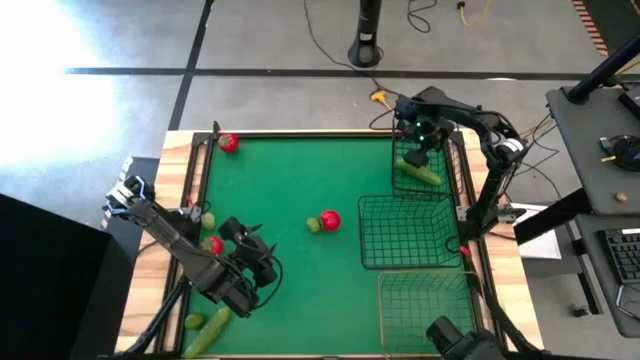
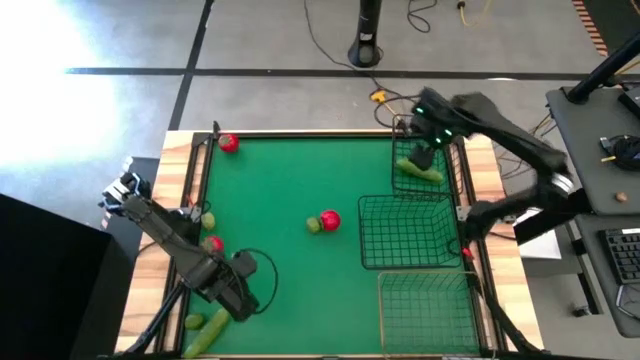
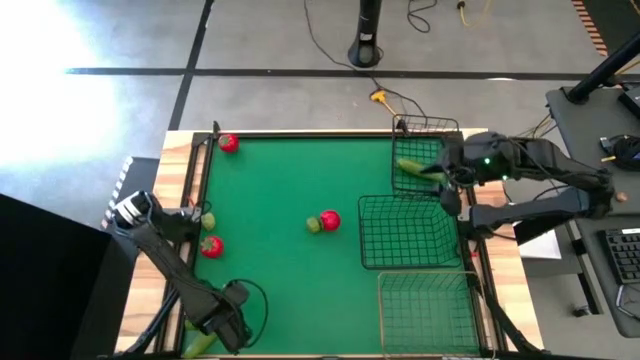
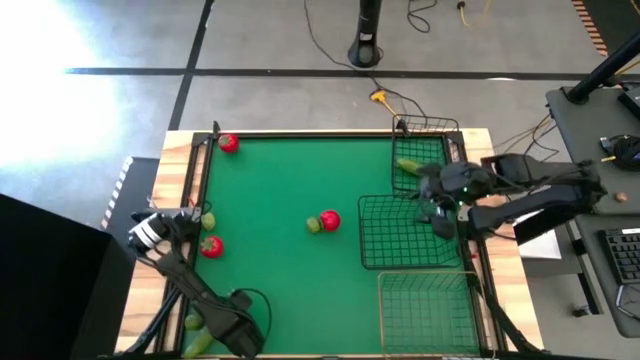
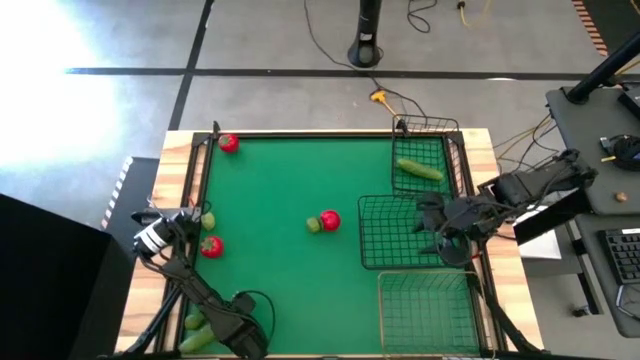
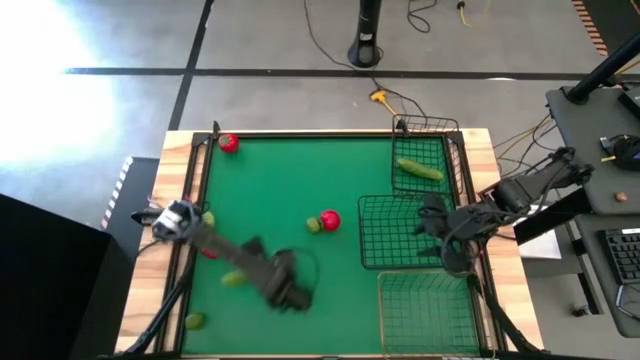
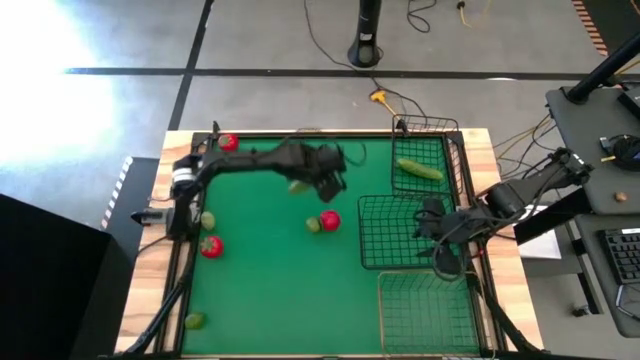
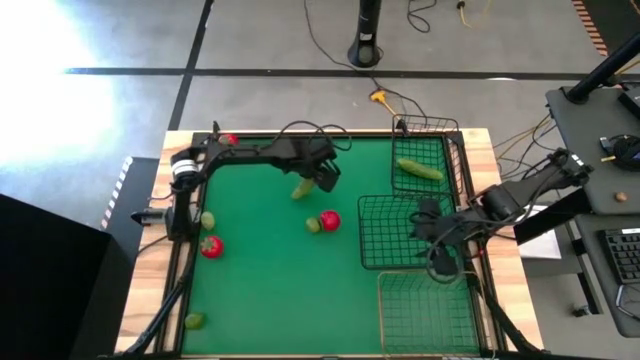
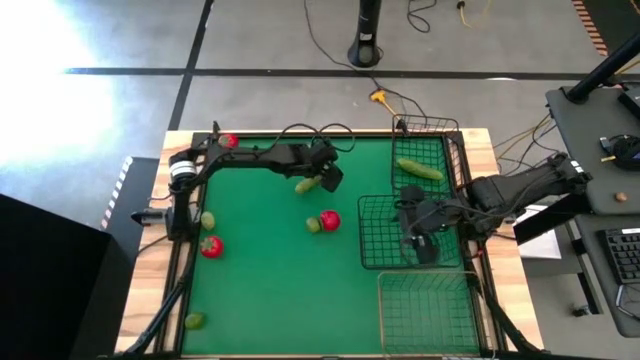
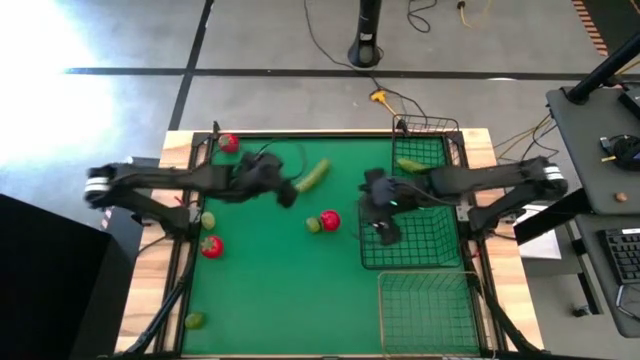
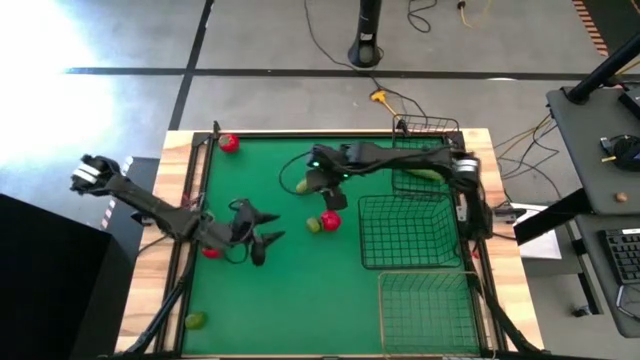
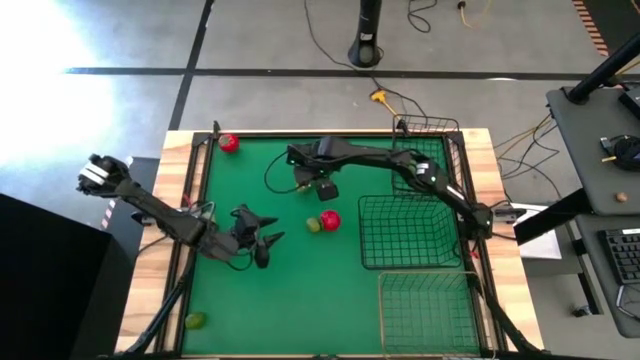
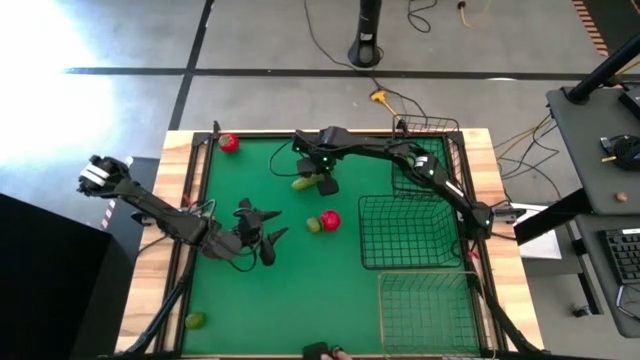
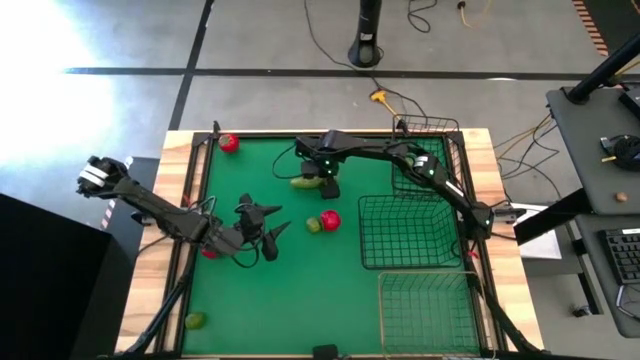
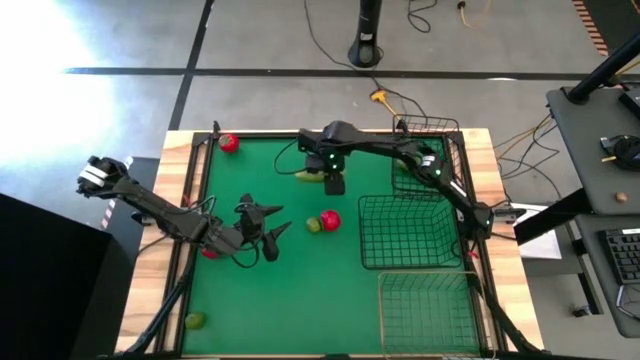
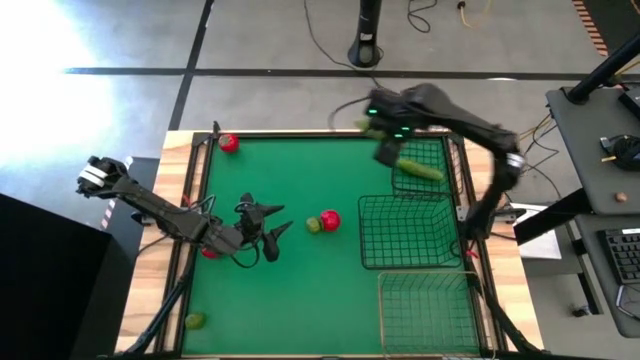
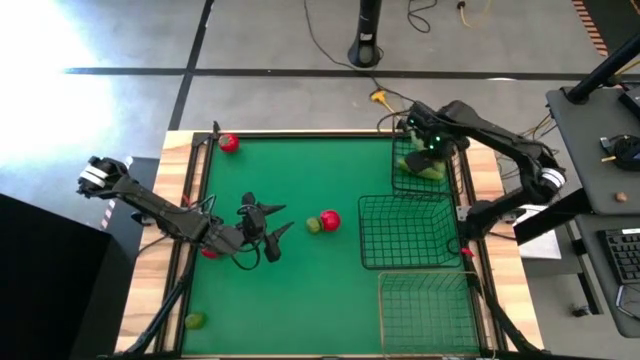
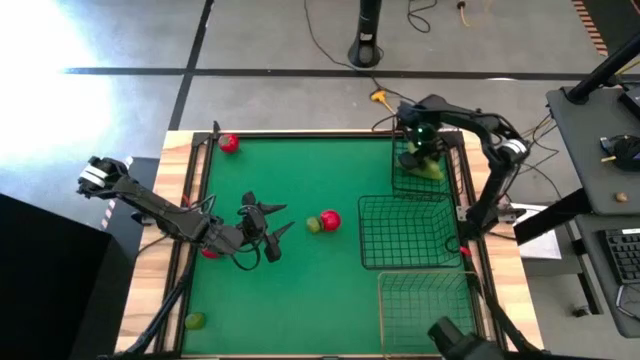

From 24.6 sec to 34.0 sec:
Task: Sort produce into baskets
Put the cucumber into the top black wire basket

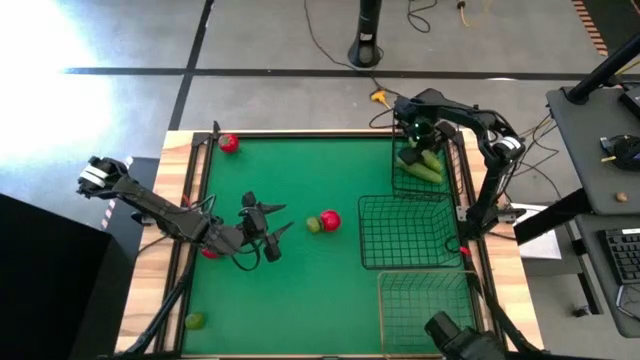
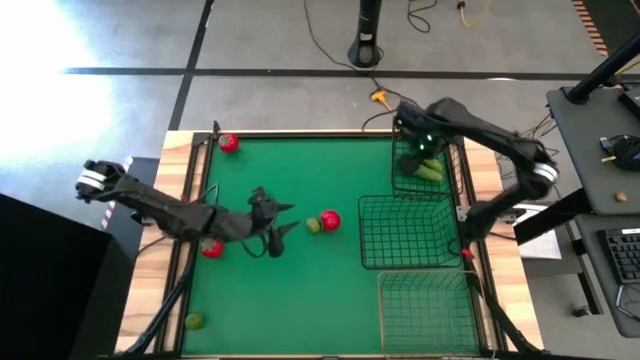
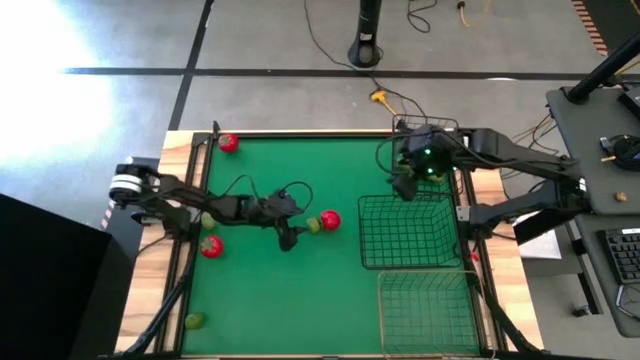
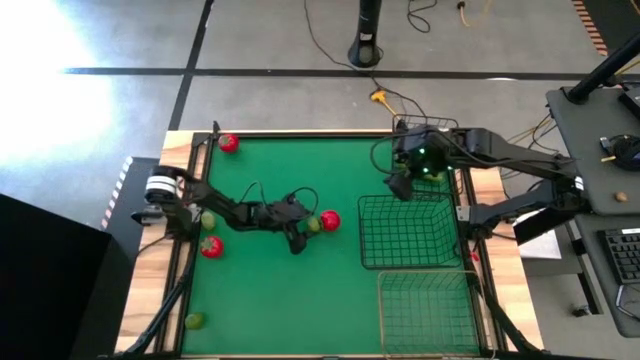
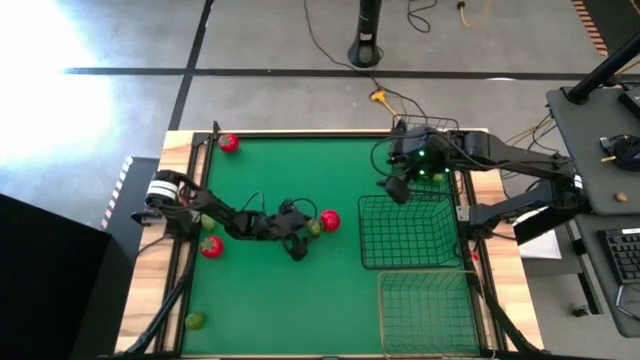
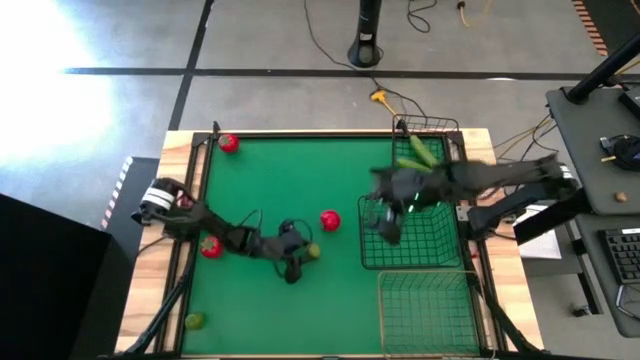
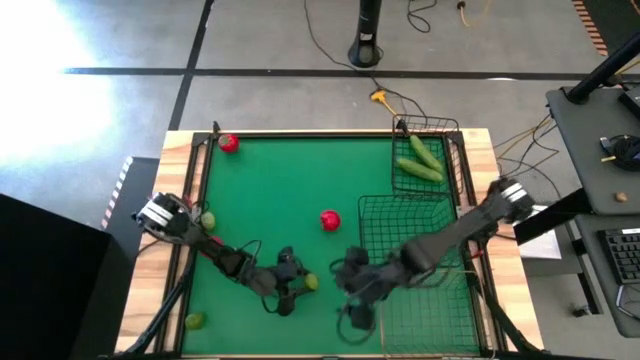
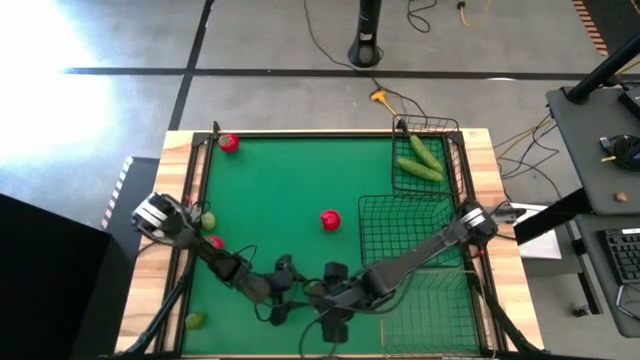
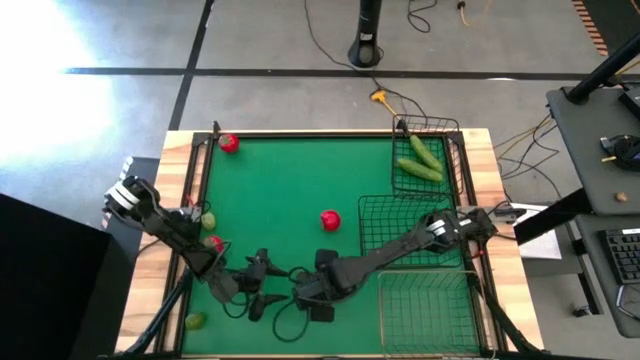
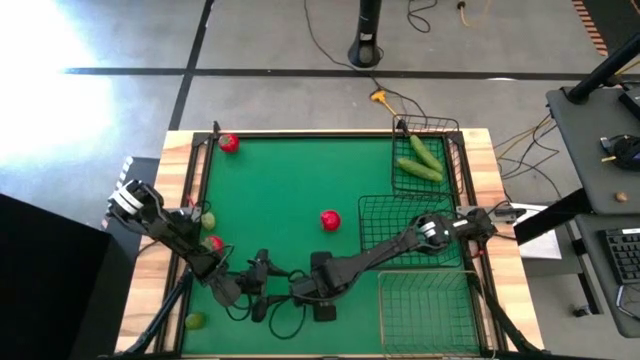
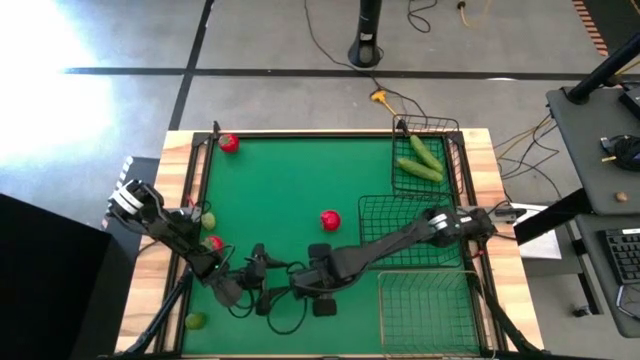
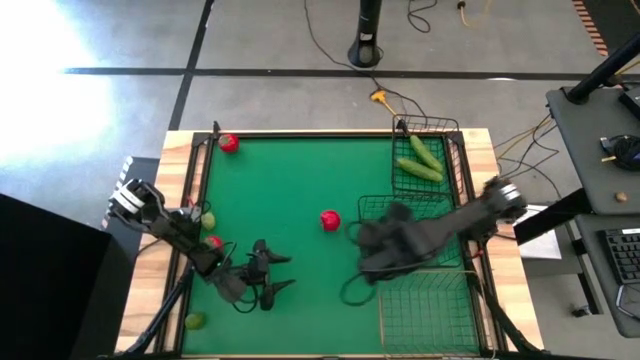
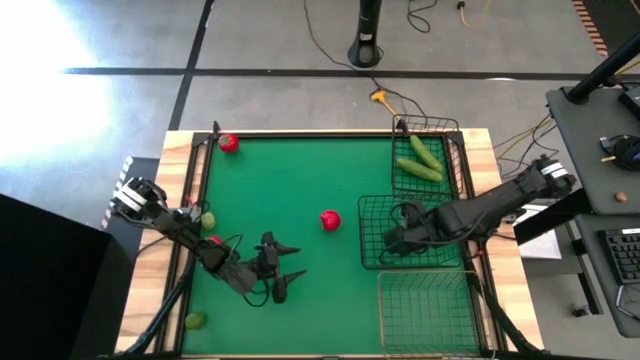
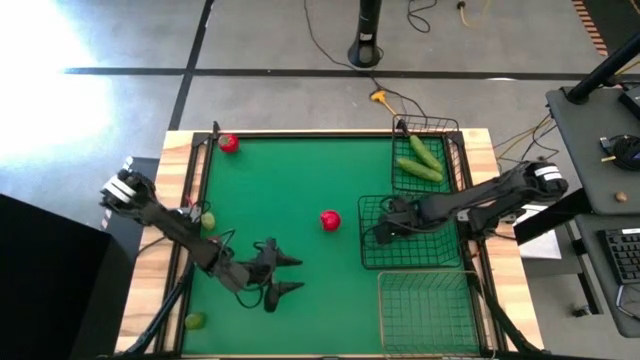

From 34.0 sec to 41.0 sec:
Put the right lime into the bottom black wire basket

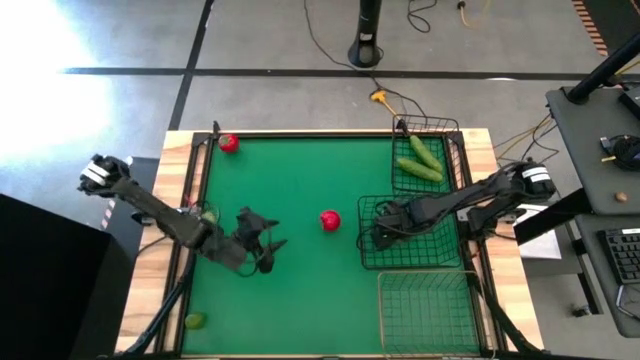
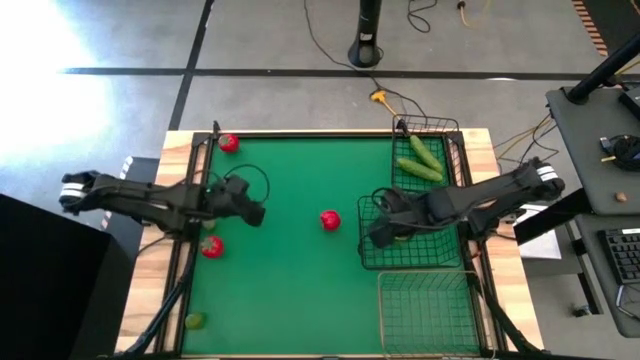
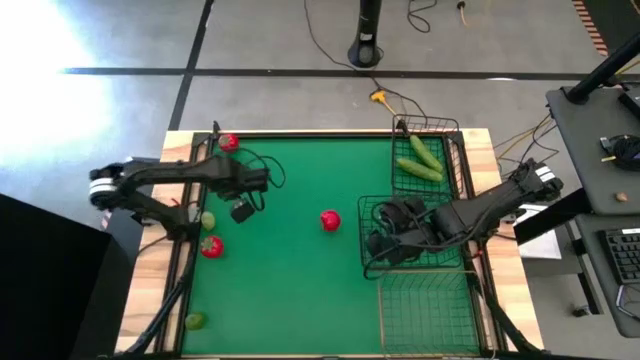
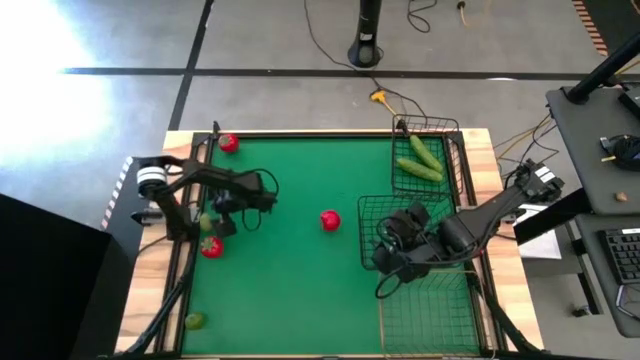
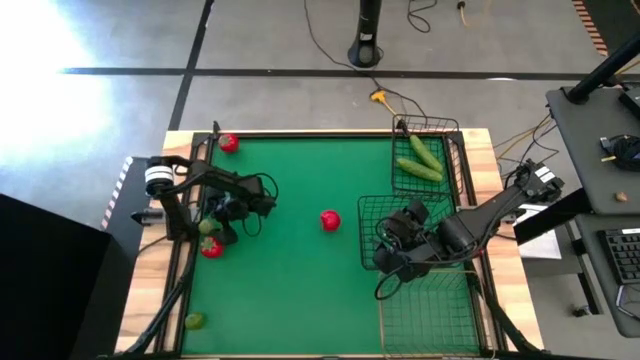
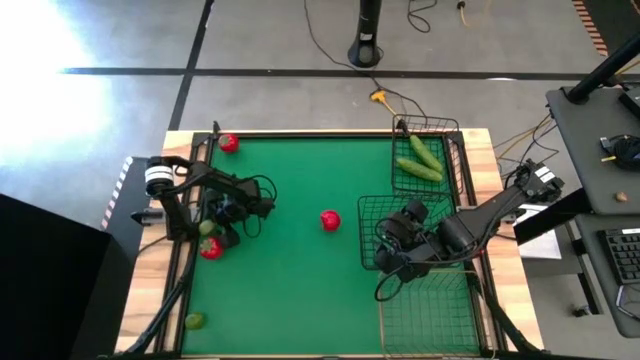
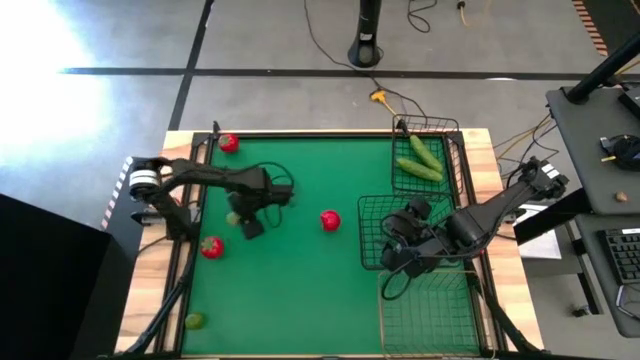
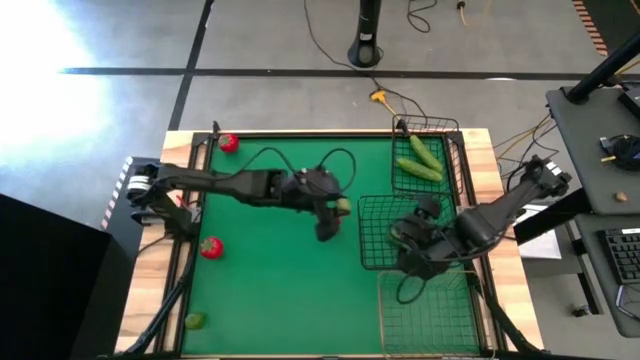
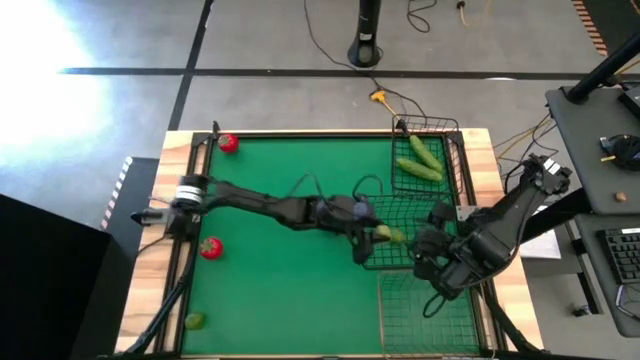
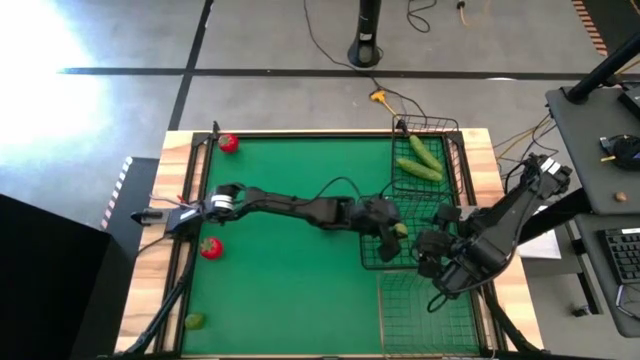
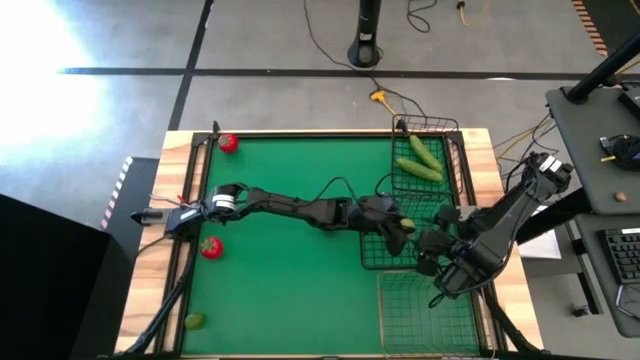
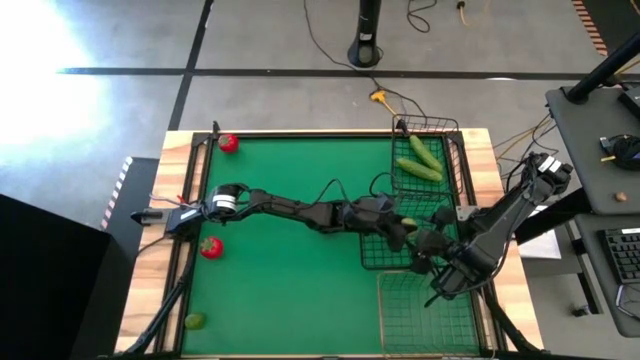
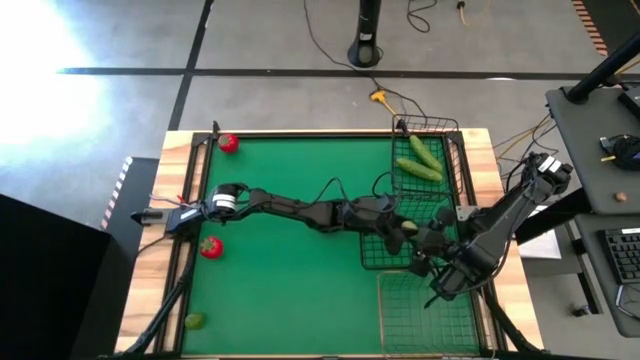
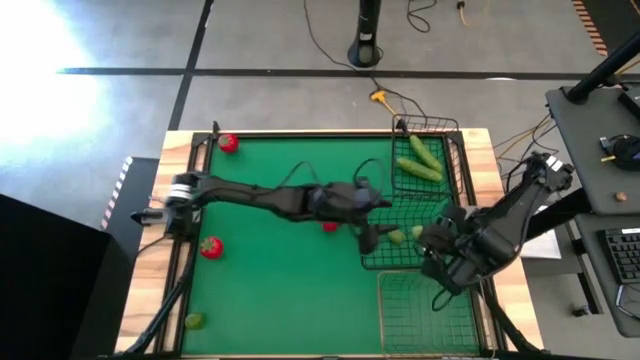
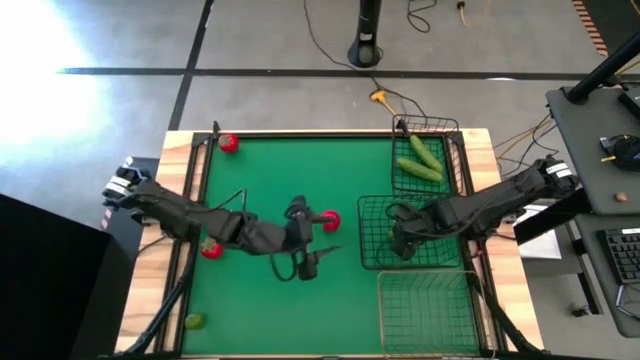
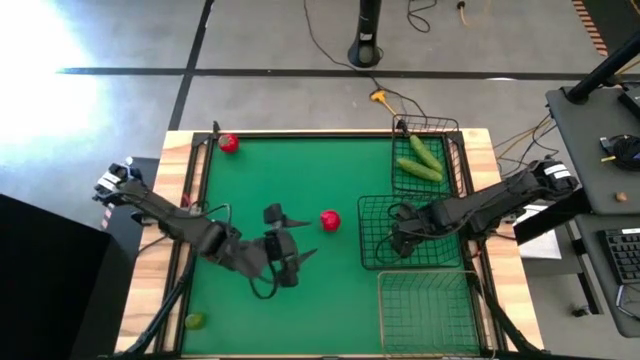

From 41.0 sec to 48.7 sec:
Put the top lime into the bottom black wire basket
